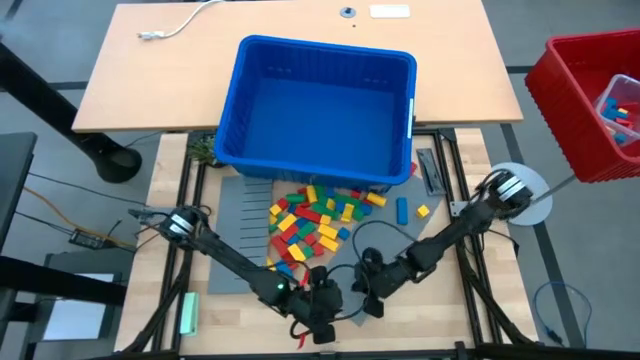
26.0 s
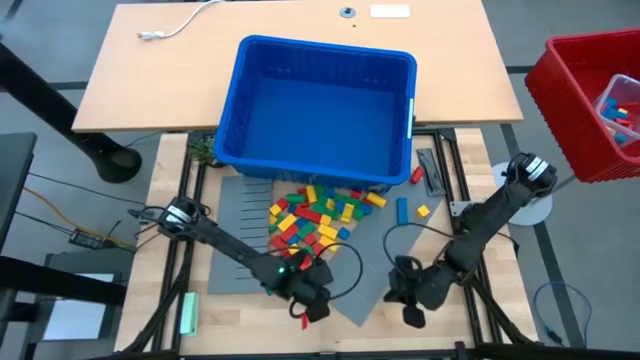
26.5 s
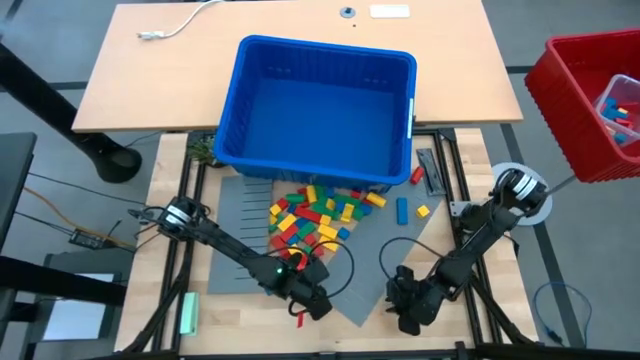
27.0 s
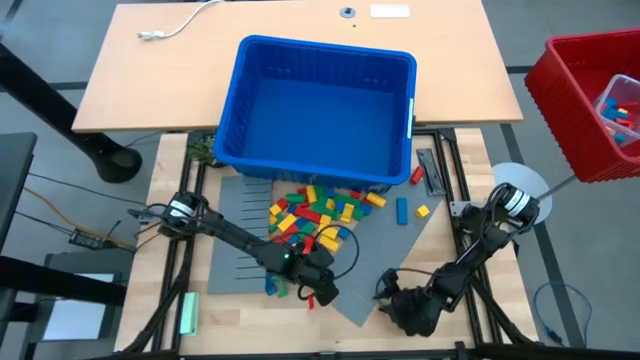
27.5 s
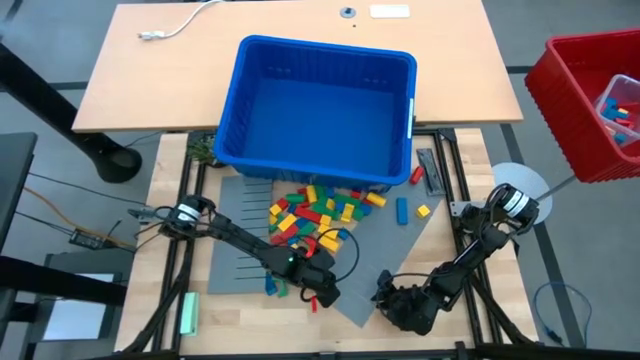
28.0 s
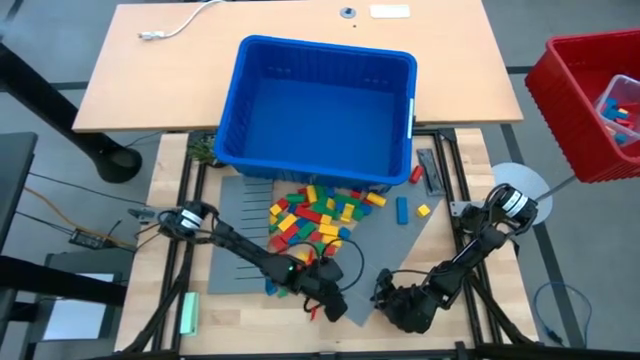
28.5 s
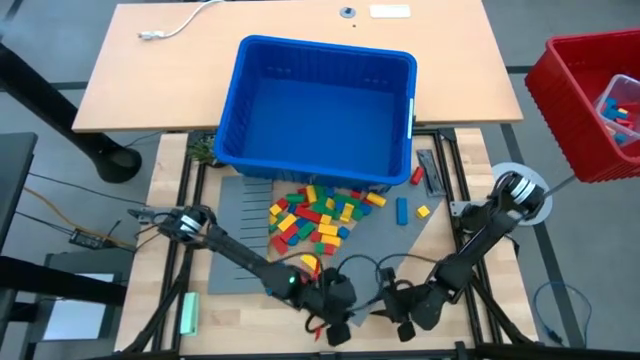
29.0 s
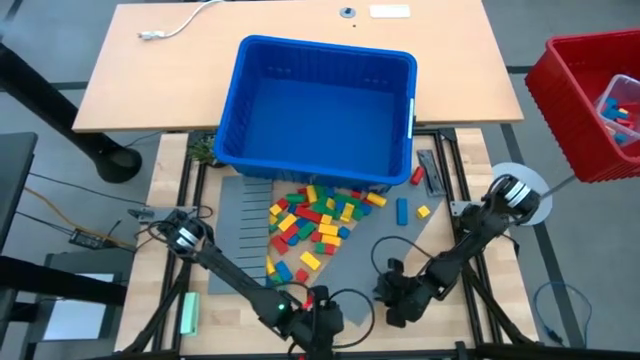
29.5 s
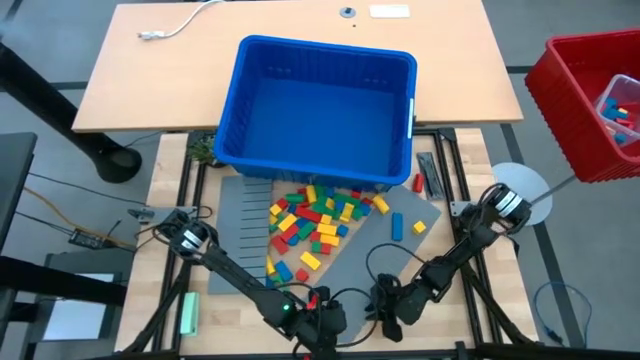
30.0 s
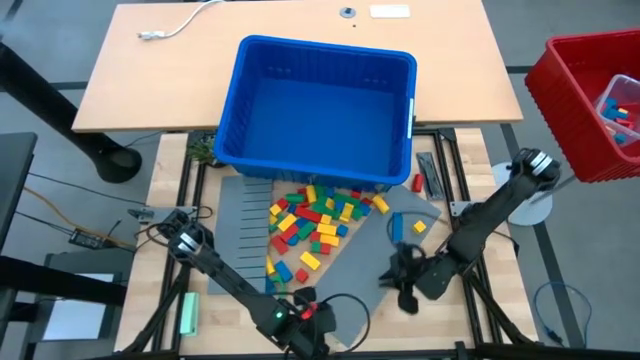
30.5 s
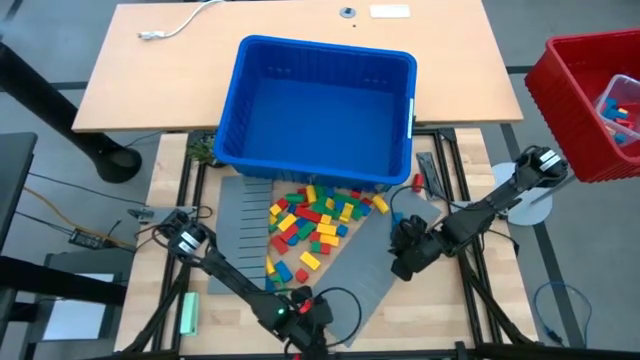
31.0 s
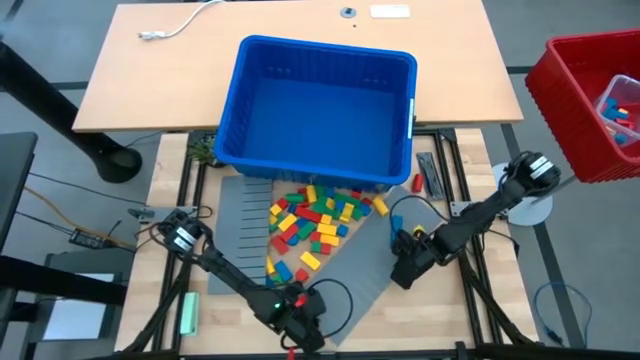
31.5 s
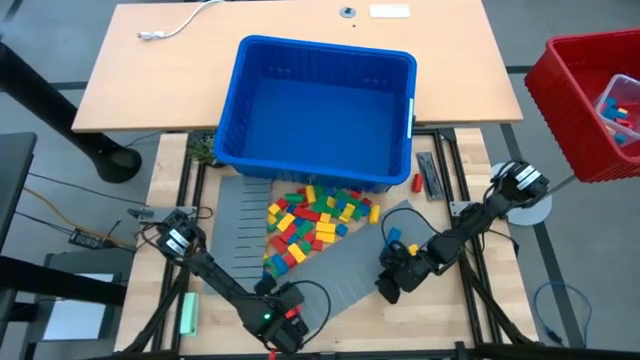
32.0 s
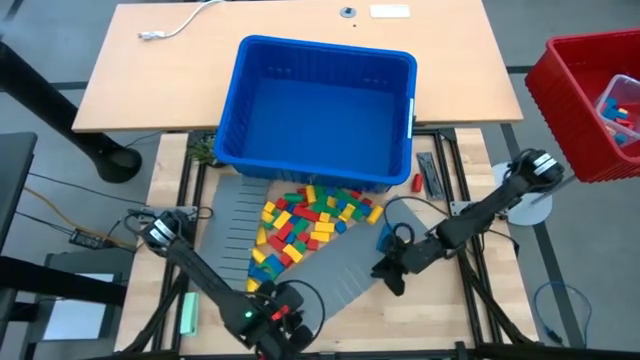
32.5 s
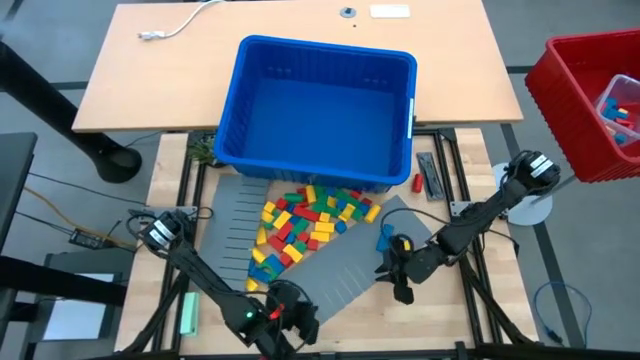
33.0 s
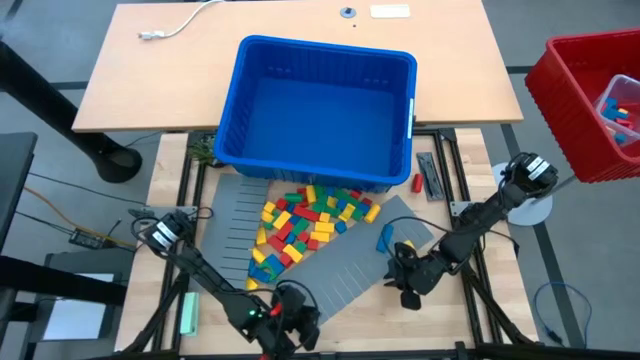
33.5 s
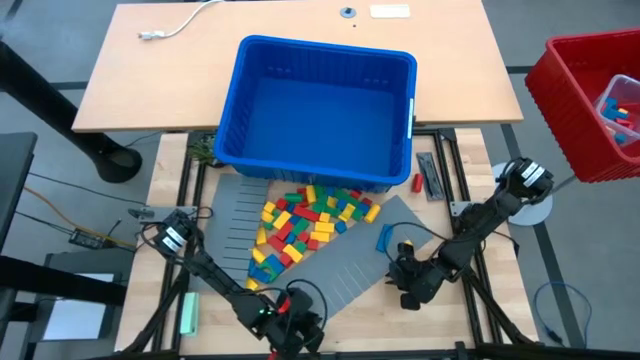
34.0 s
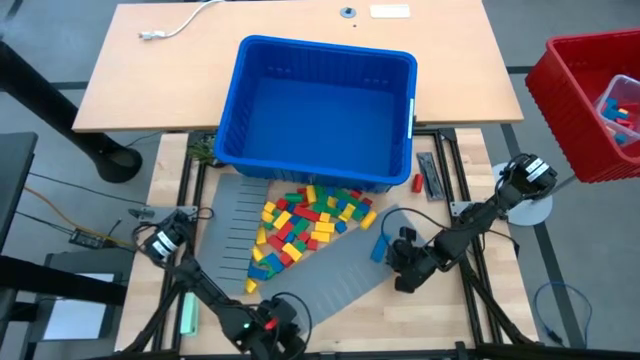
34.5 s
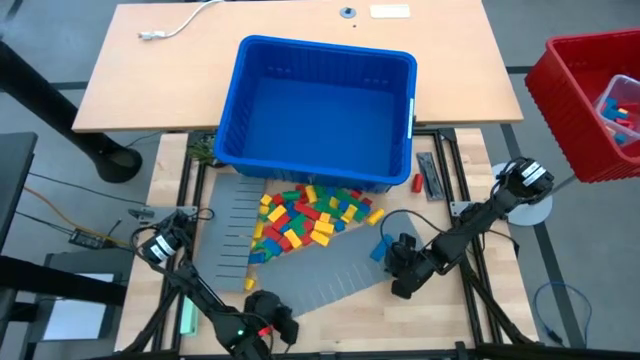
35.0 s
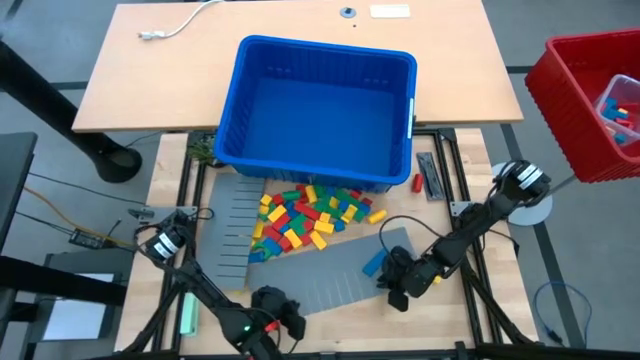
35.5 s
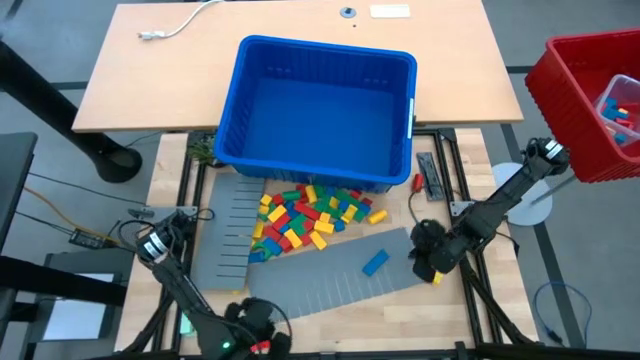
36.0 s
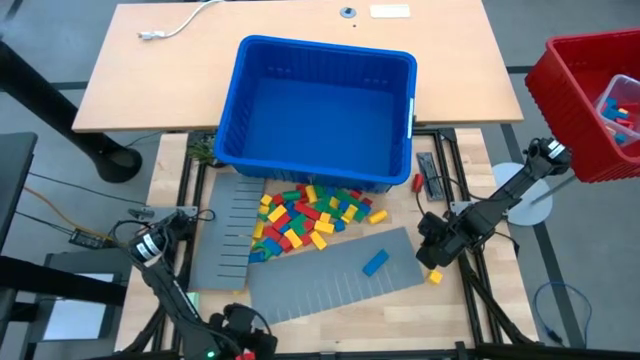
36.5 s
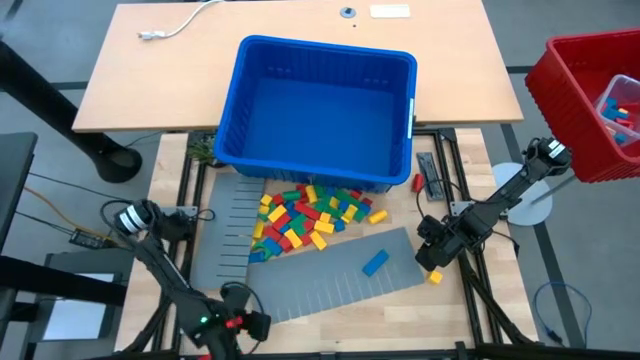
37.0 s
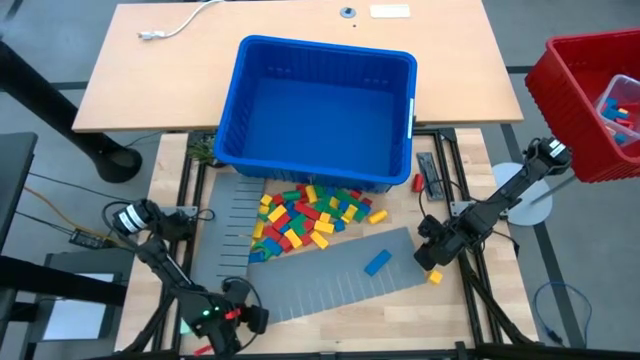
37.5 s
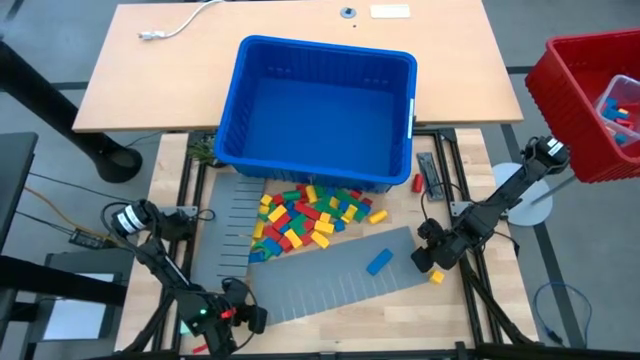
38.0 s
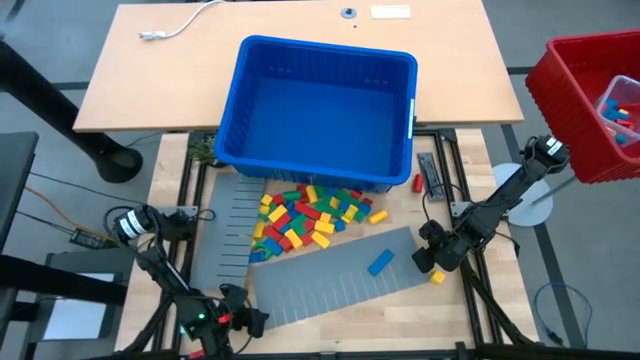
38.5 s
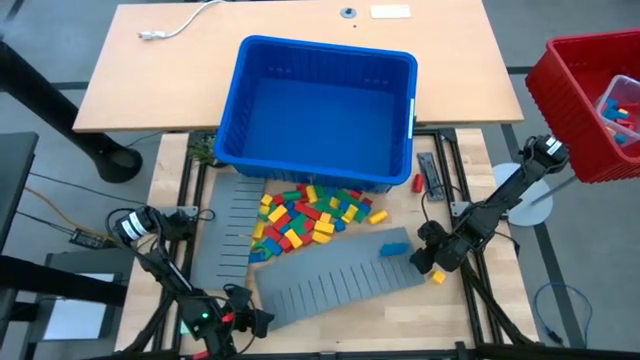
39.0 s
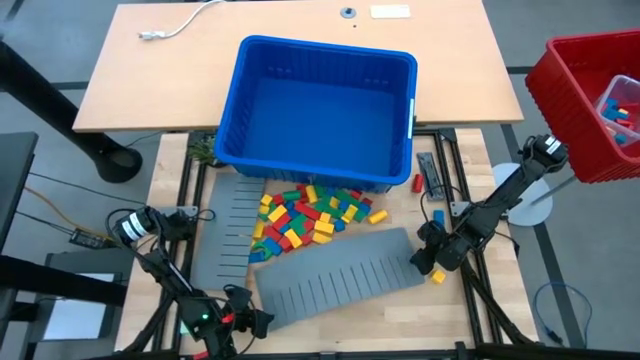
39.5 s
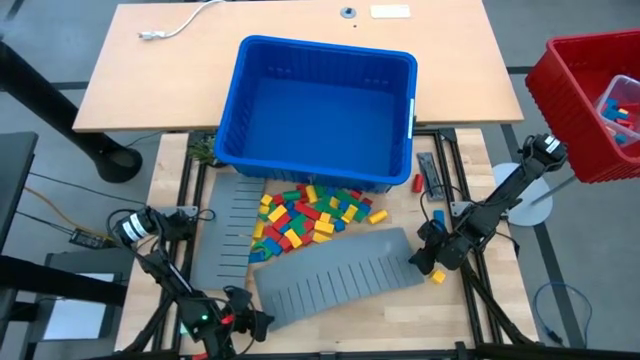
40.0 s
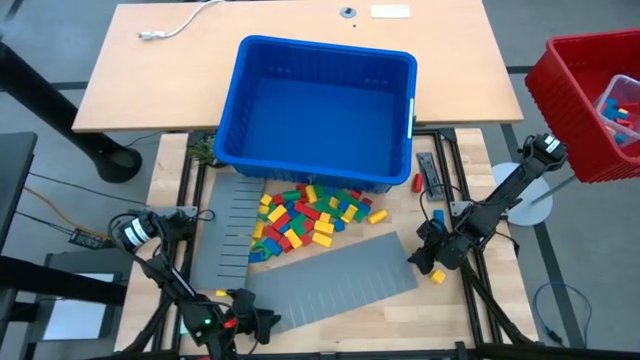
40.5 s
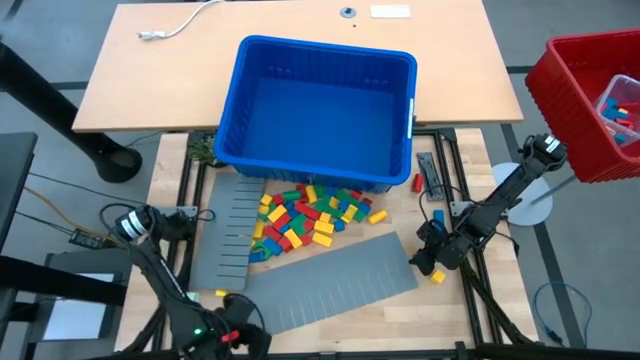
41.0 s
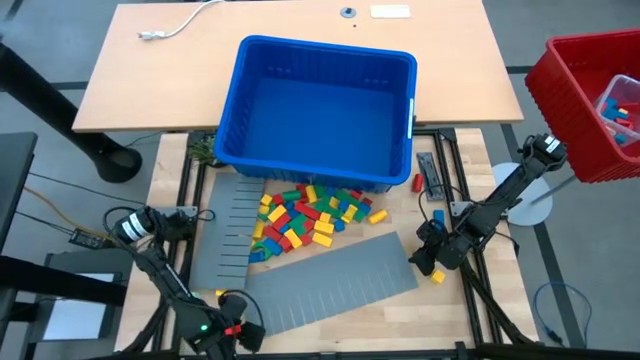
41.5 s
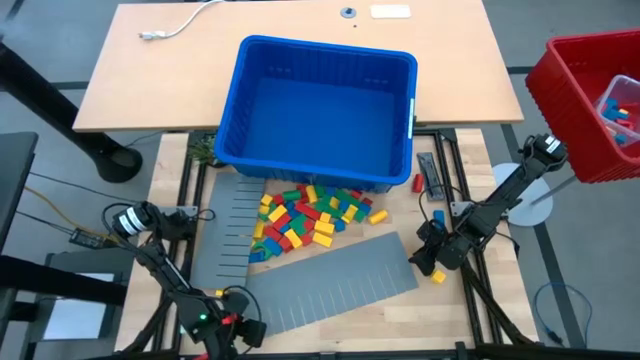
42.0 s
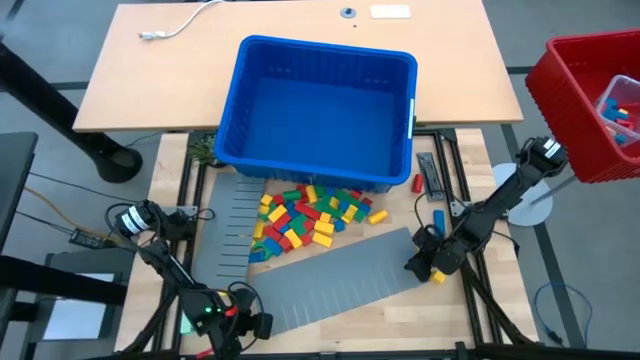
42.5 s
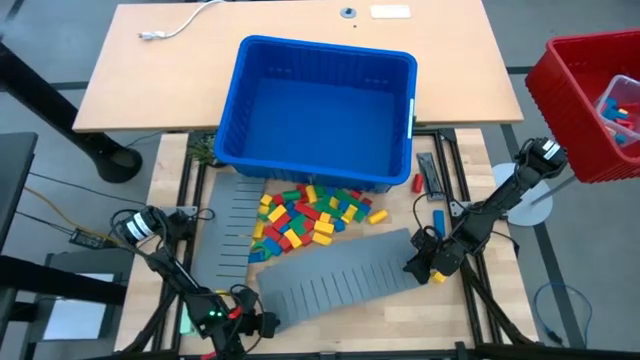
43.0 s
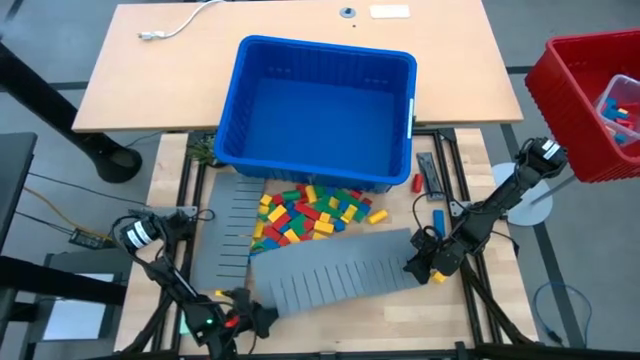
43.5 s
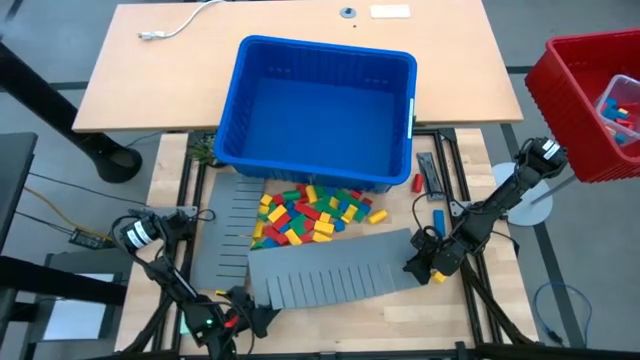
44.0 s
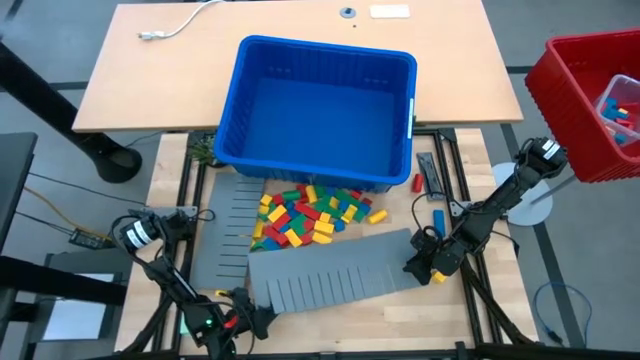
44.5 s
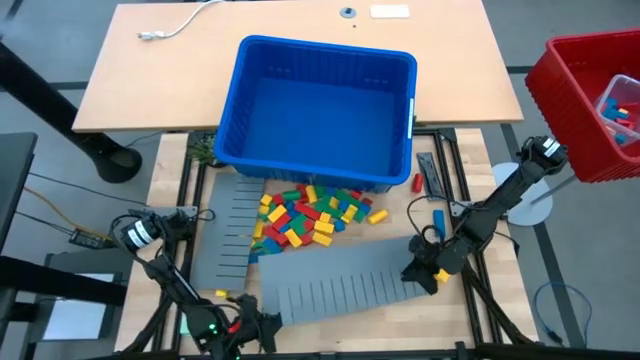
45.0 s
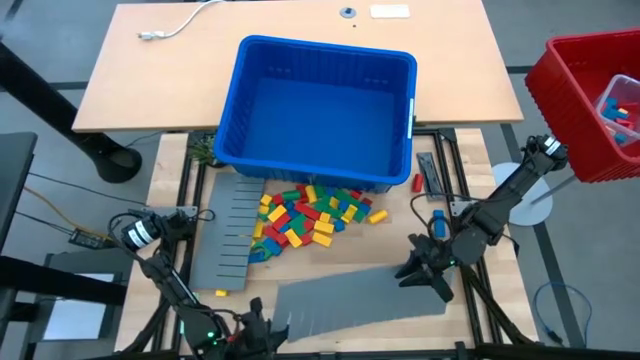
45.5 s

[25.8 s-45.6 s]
Task: Sort blocks
Assemble the blue bin using gray bin divider
